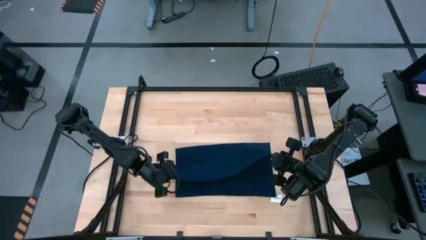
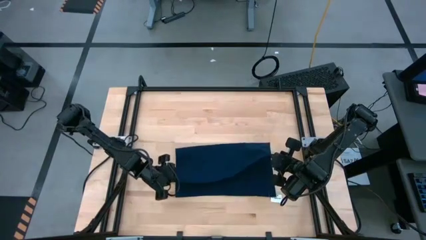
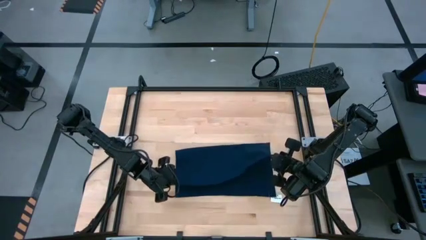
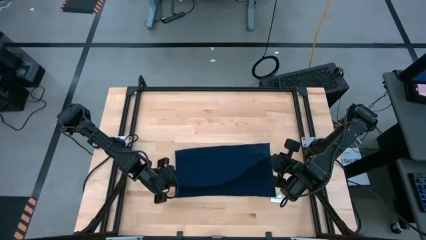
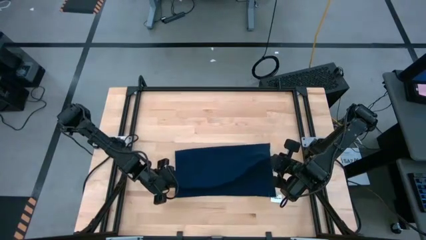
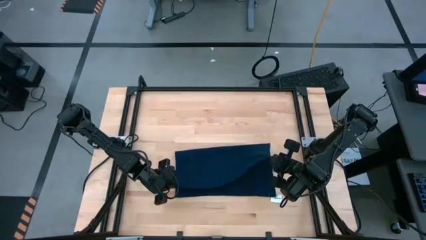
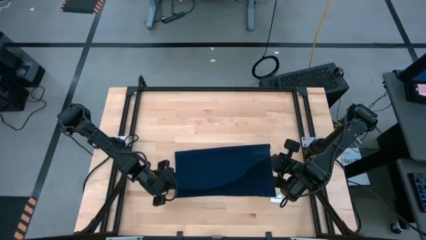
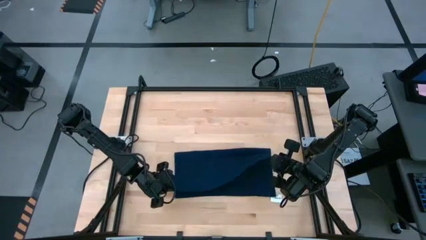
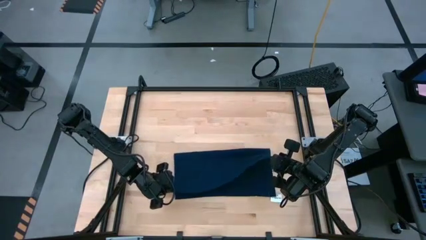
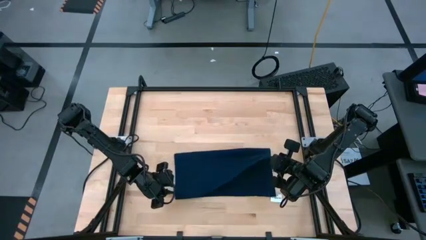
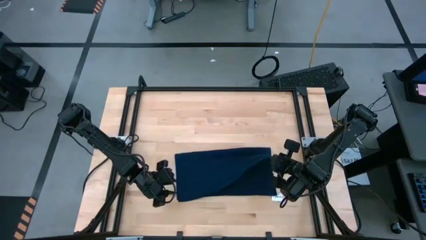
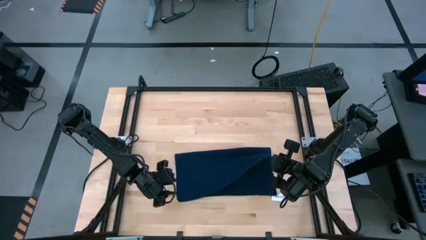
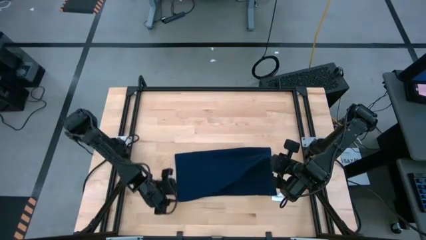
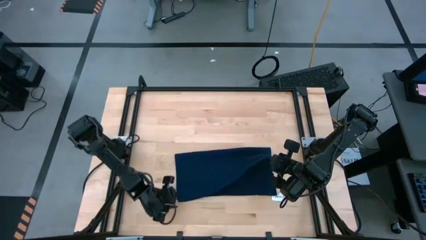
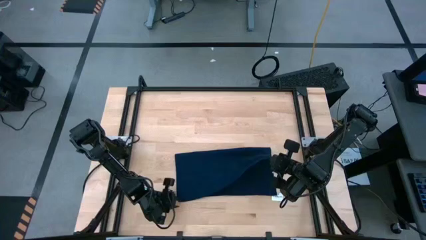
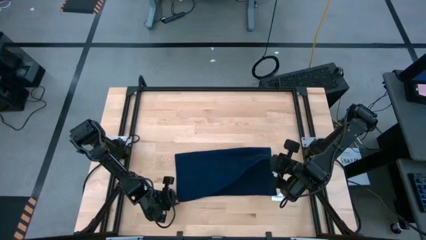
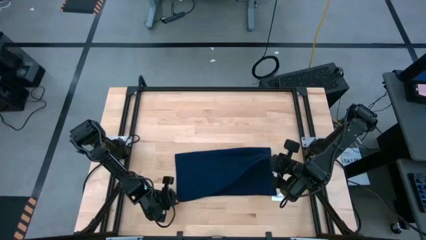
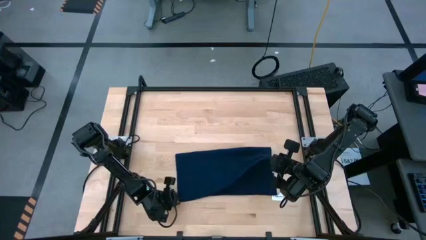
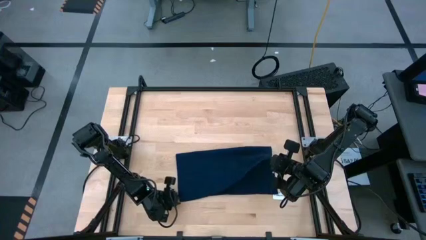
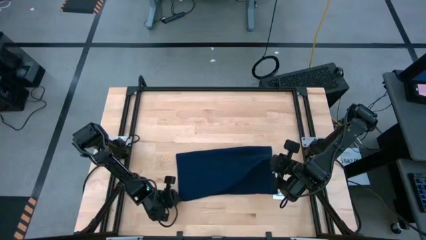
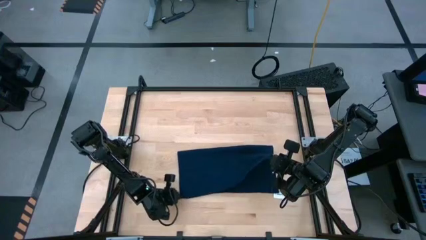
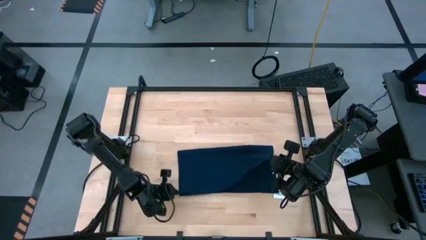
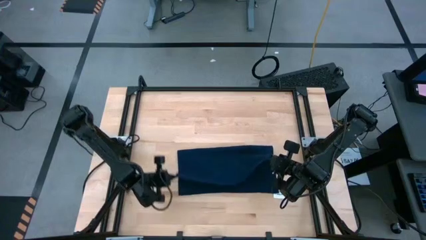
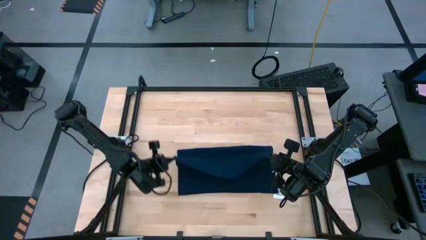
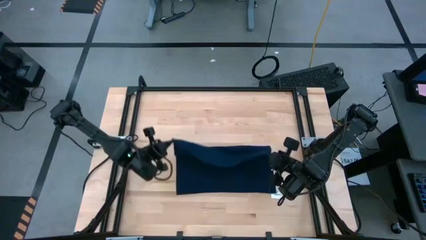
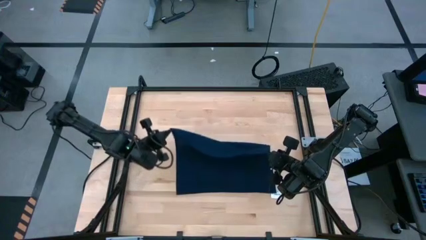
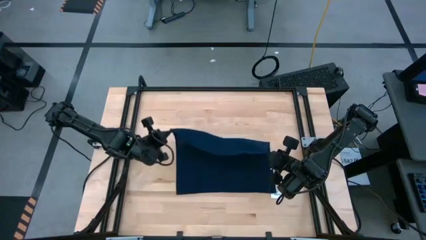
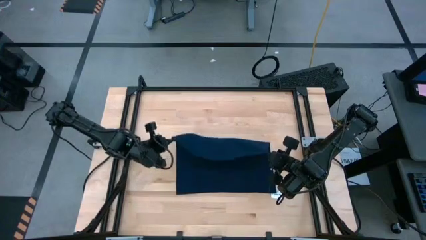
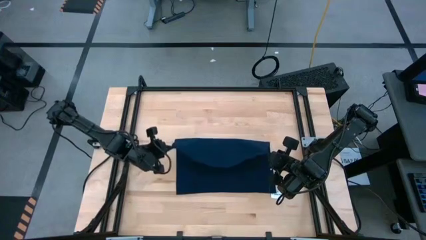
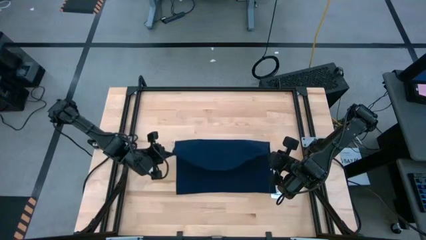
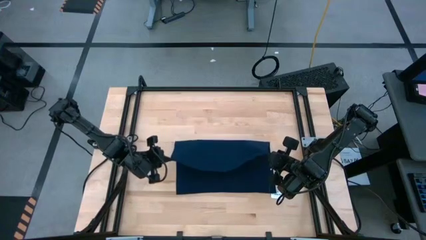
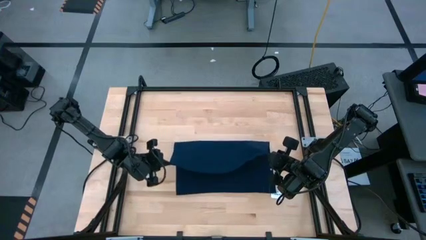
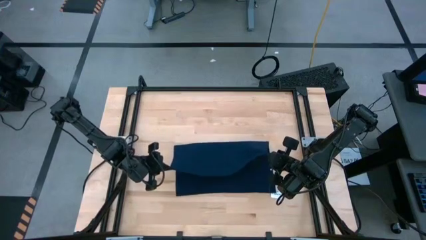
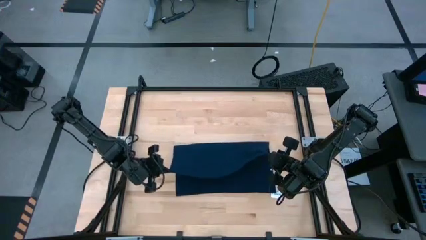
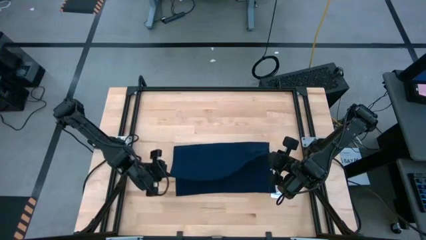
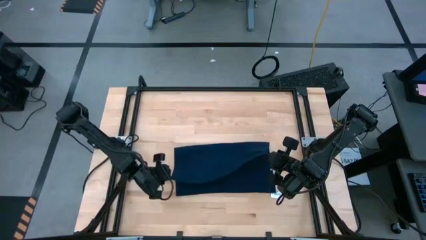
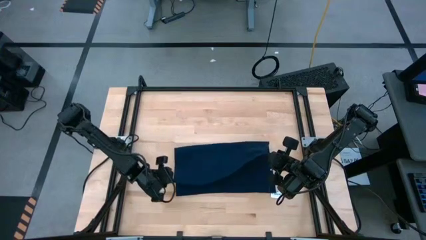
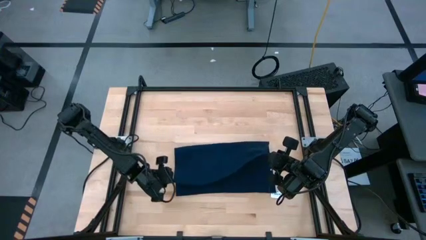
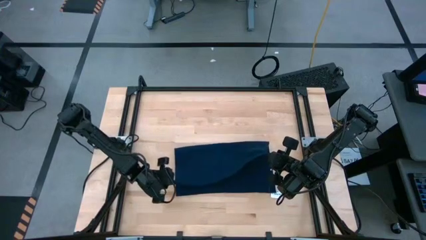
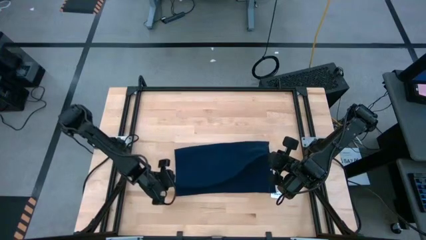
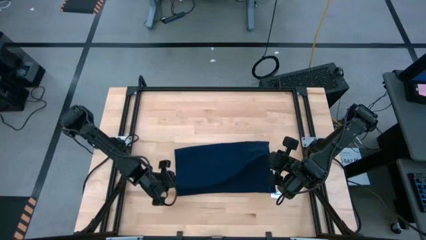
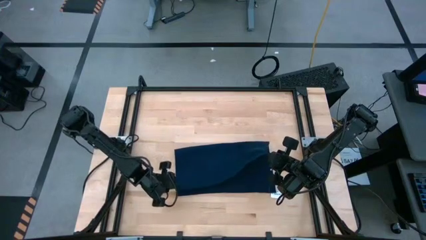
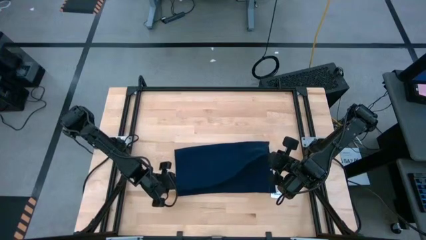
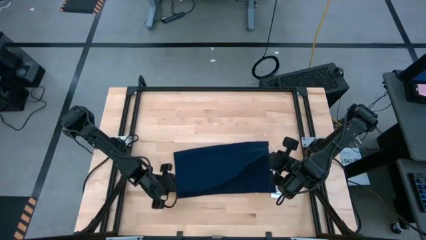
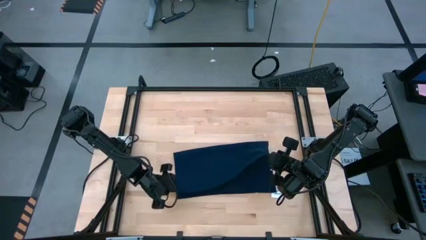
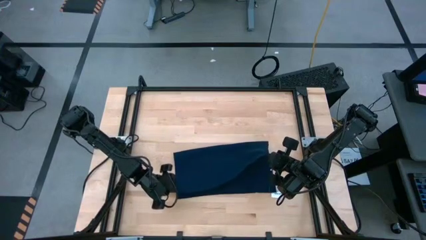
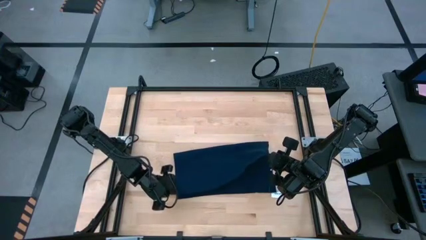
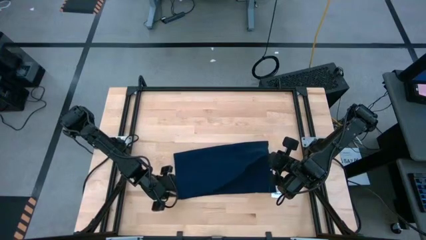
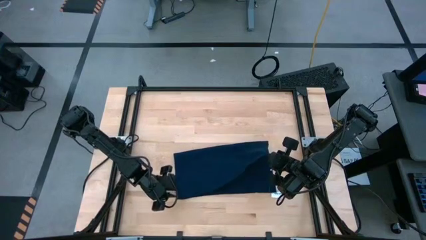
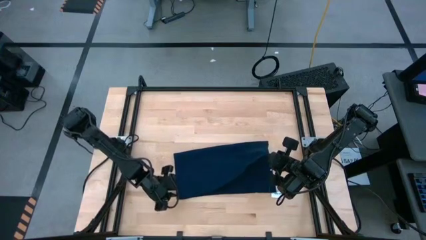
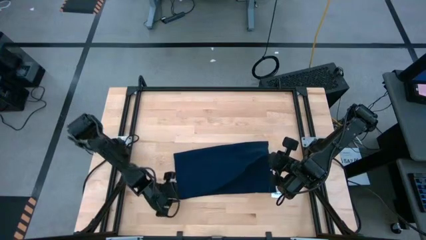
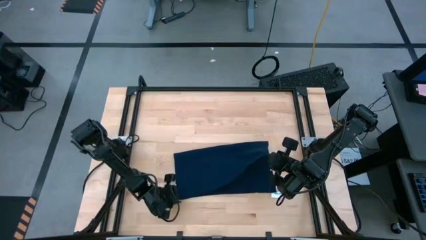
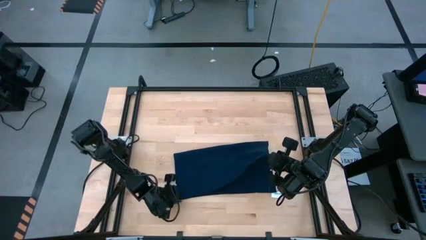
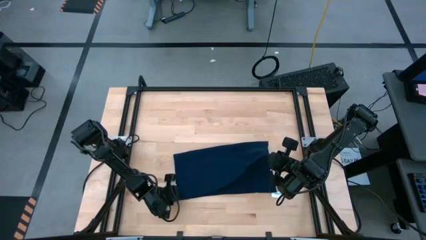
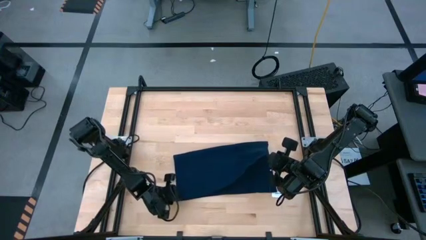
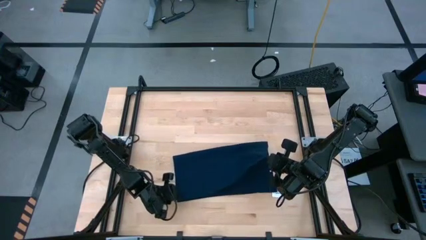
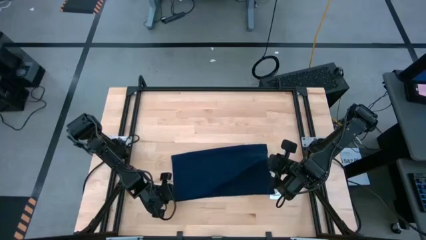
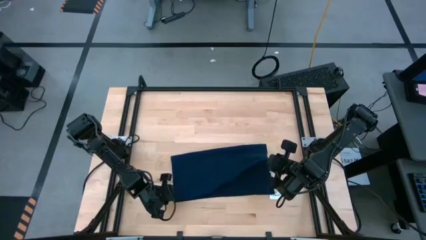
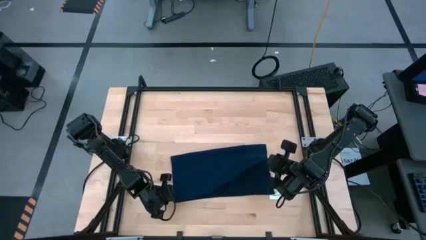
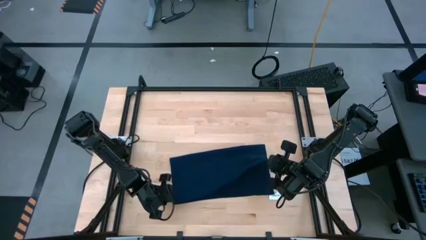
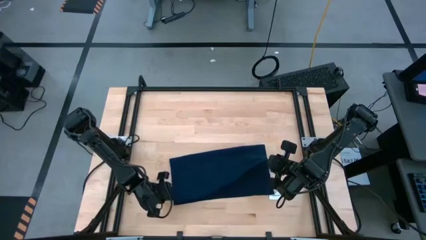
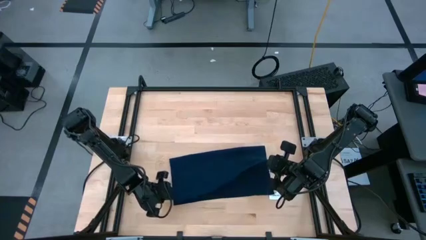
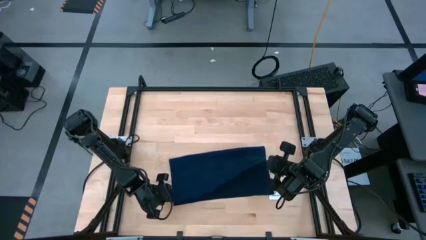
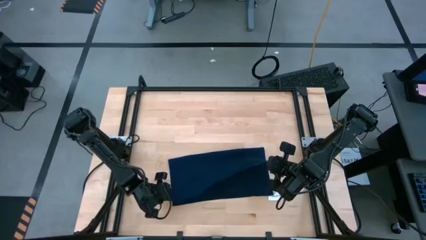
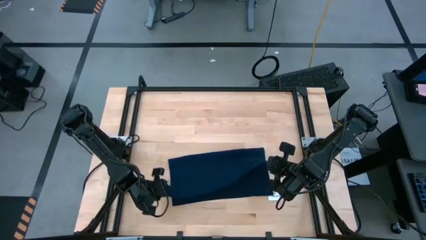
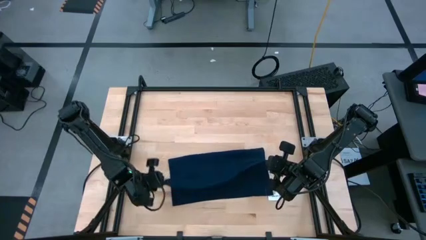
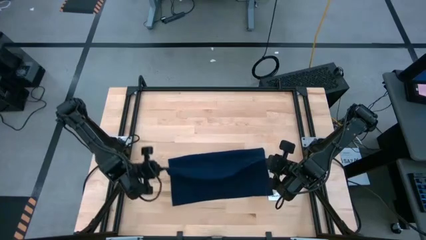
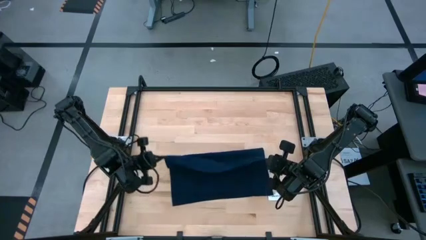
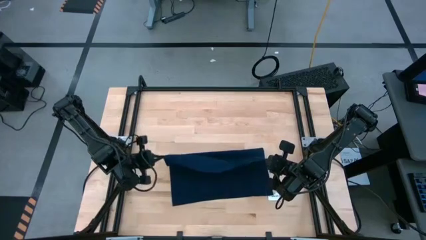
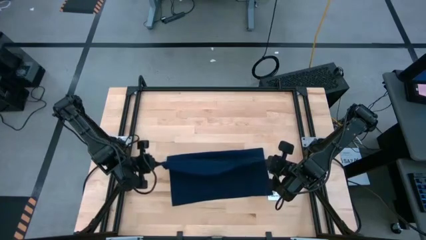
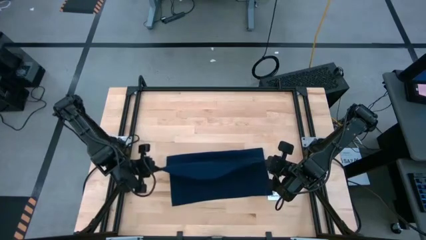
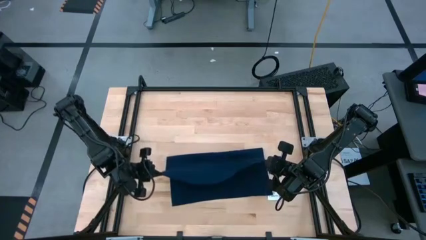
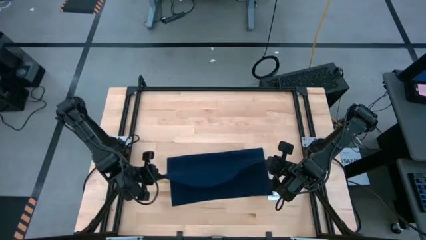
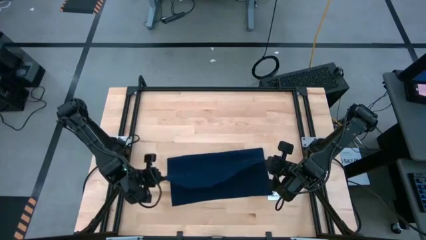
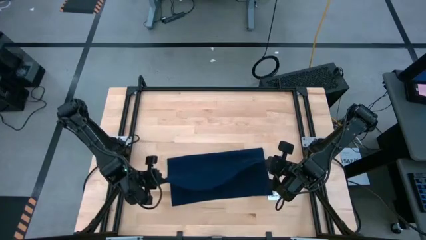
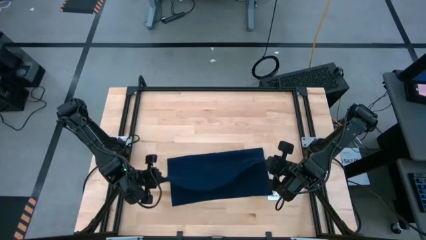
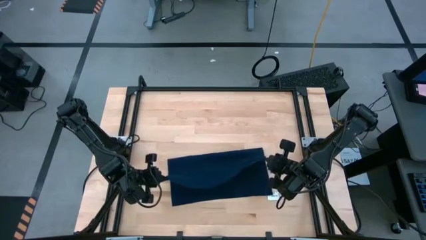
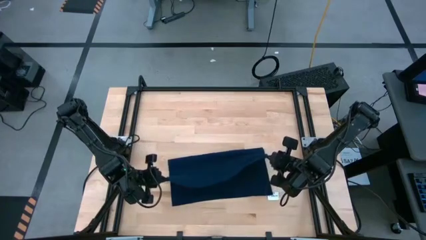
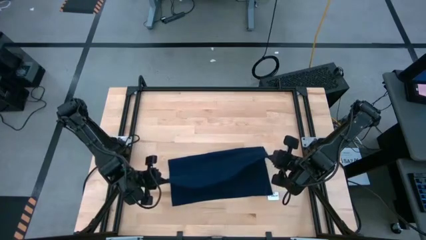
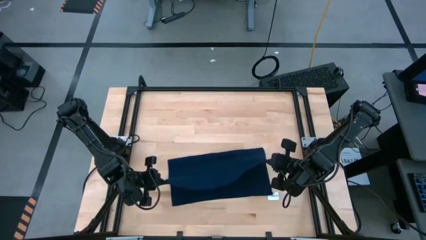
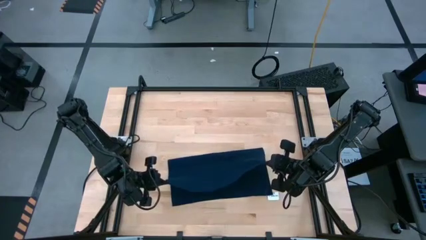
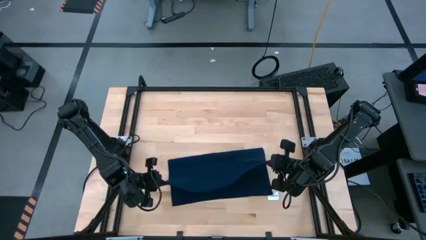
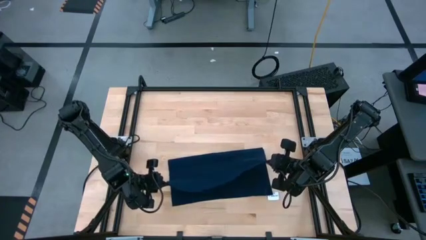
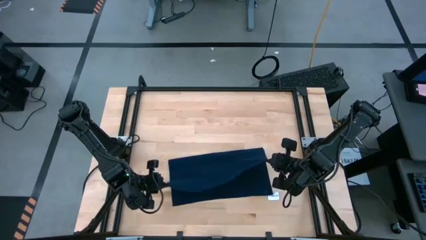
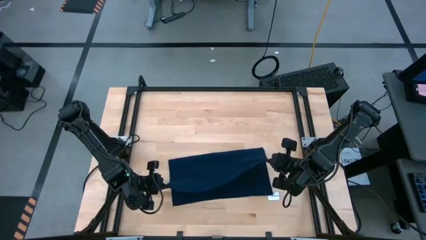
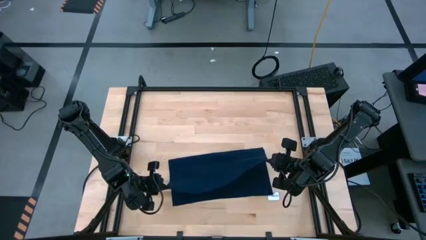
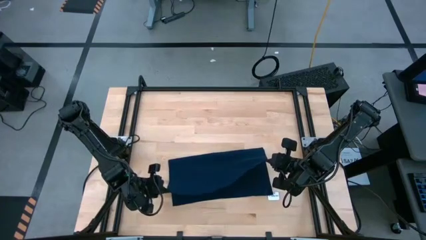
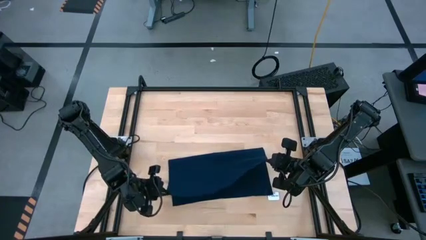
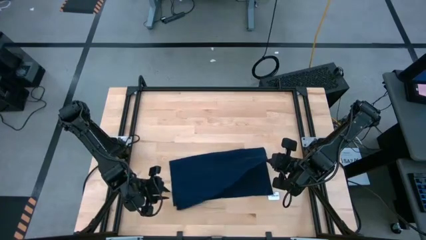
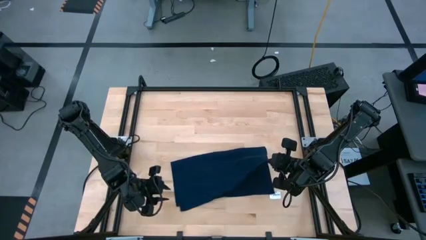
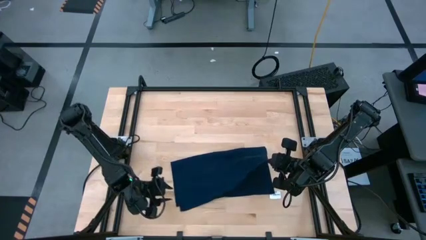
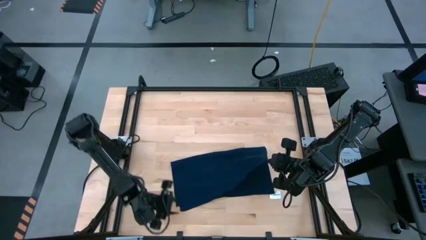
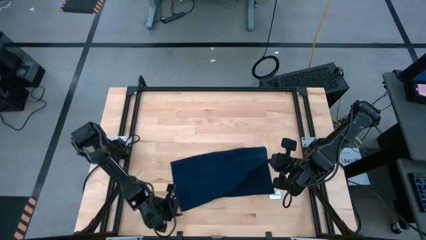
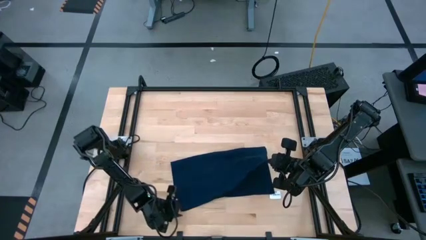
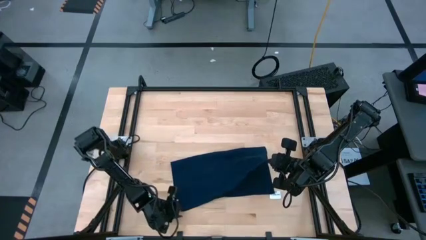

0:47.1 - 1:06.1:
Task: Roll towel into tight, uniform cylinder
Roll the blue cloth napkin
